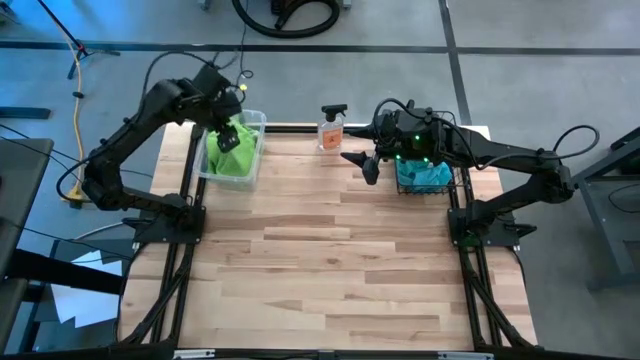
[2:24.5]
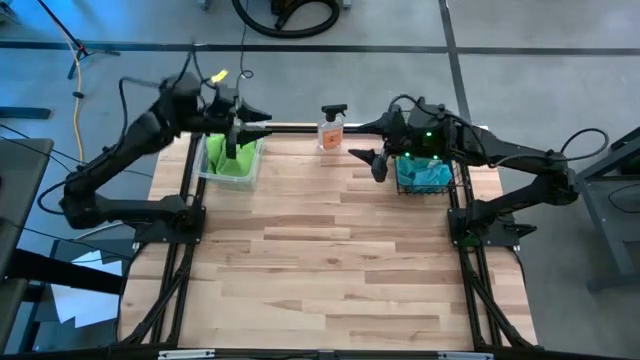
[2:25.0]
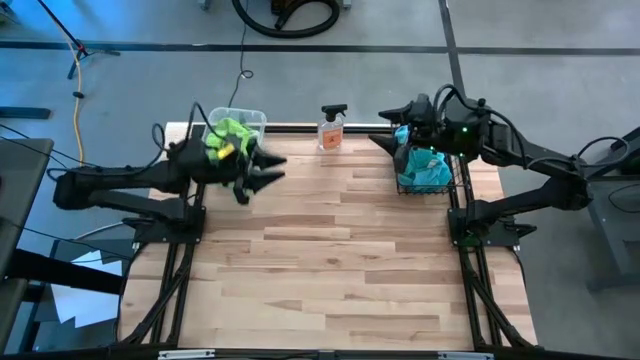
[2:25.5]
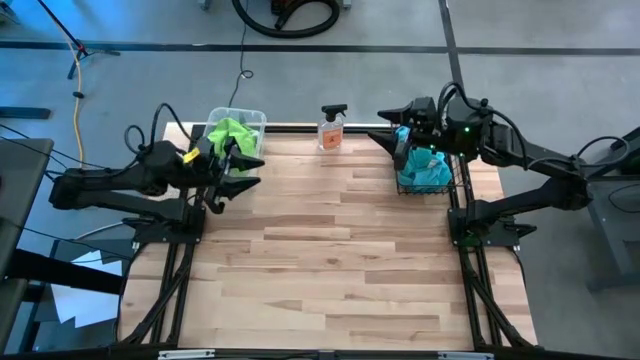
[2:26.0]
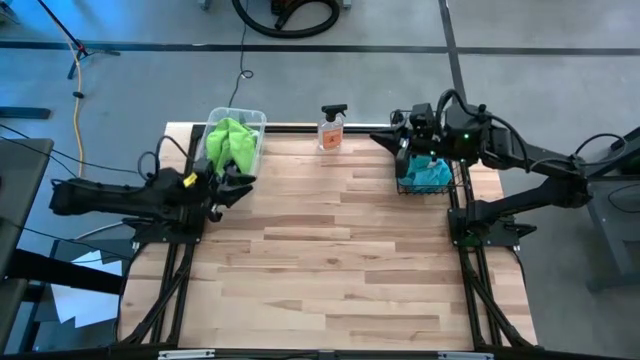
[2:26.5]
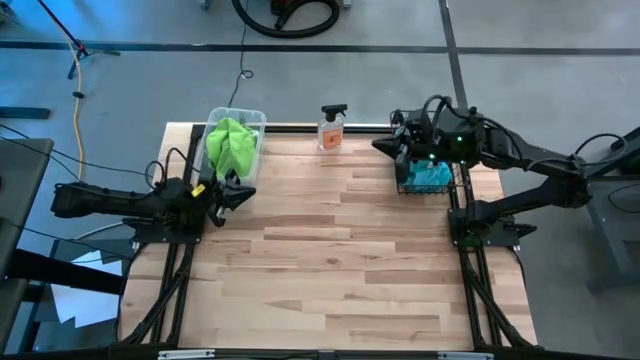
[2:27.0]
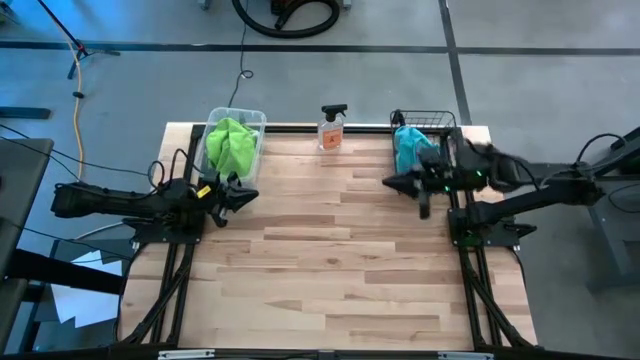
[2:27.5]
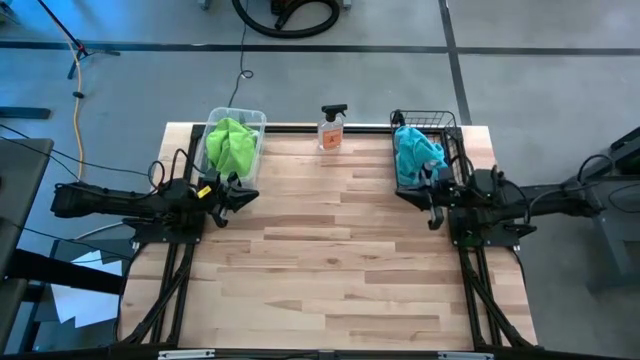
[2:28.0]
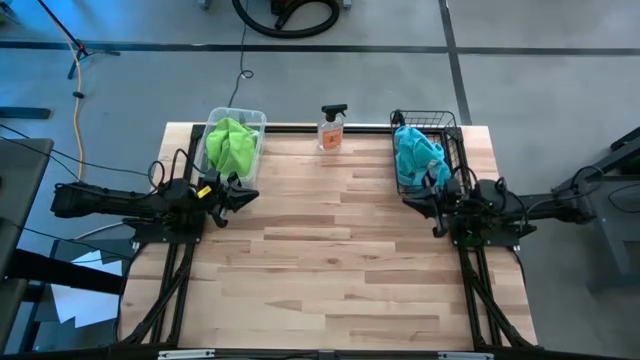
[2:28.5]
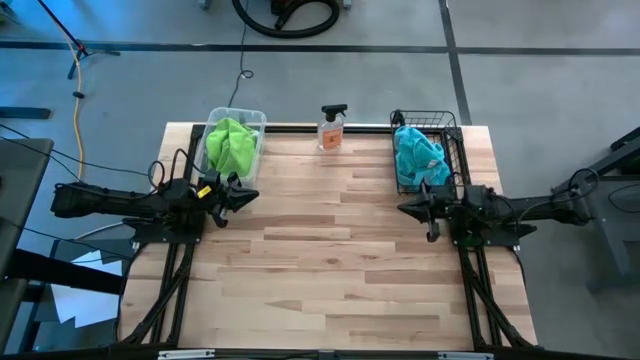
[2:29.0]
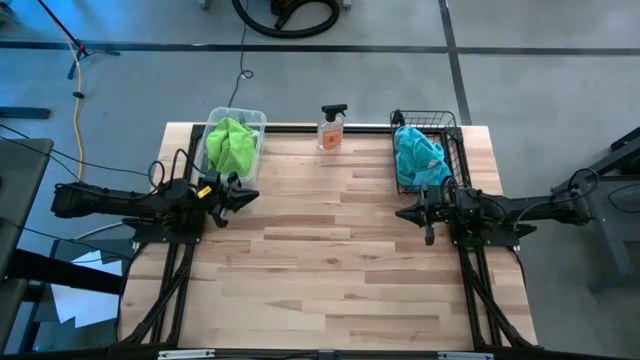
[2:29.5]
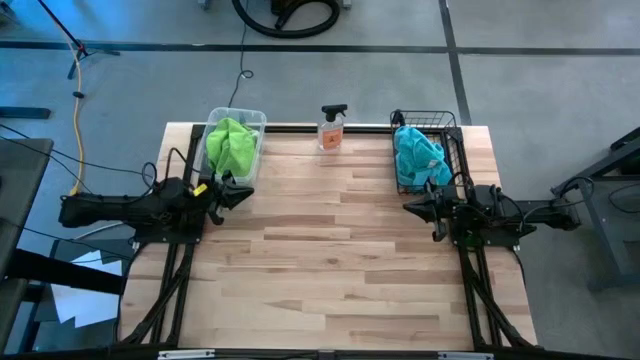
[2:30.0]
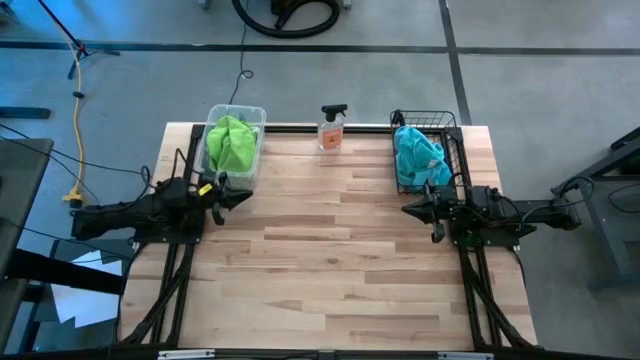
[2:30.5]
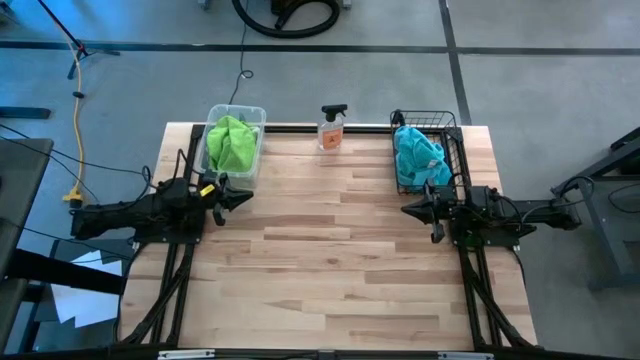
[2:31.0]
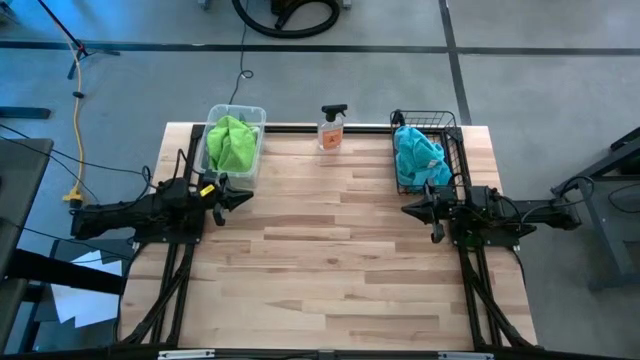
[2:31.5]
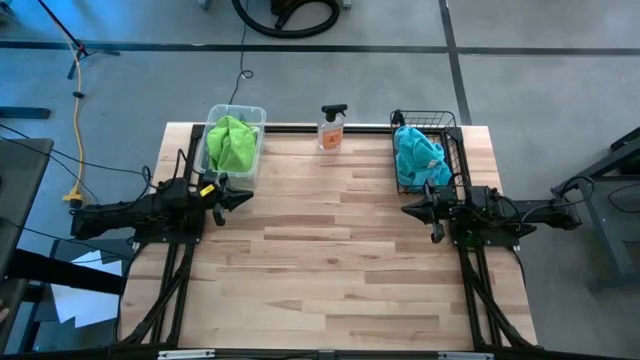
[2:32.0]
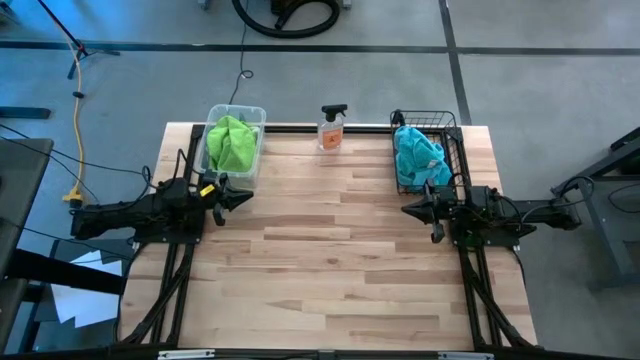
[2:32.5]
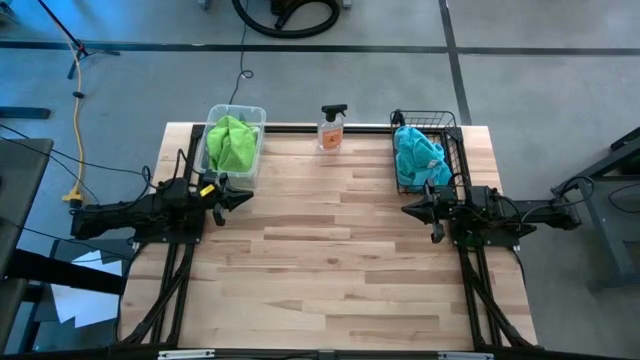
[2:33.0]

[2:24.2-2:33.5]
Task: Sort microfiber towel by color & place in baskets
Return to Home Position

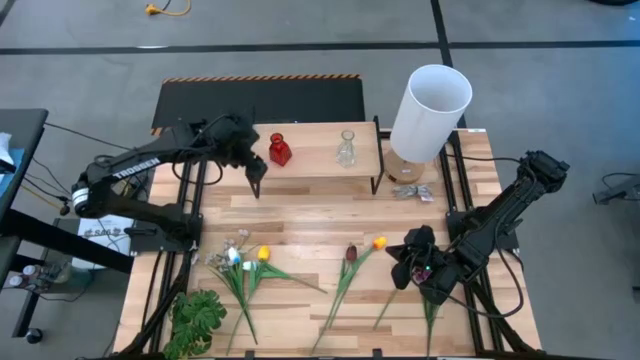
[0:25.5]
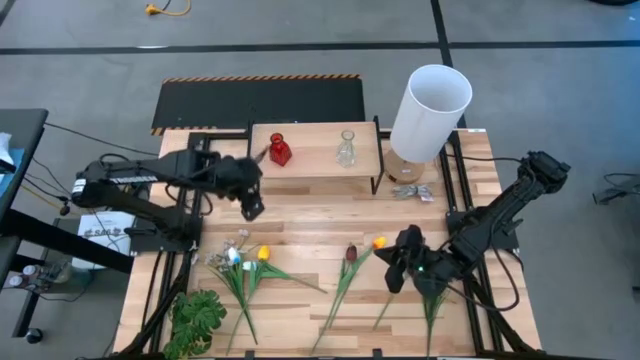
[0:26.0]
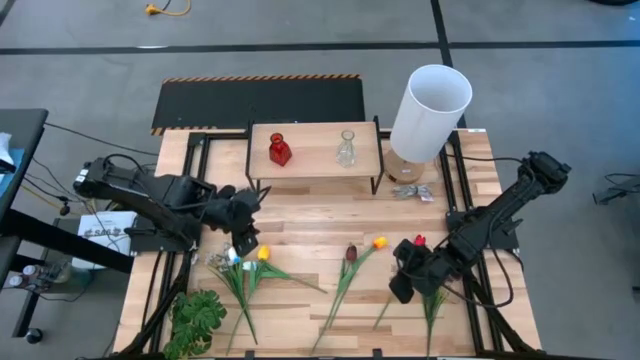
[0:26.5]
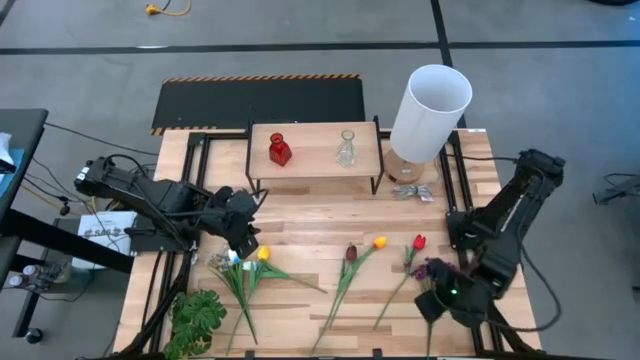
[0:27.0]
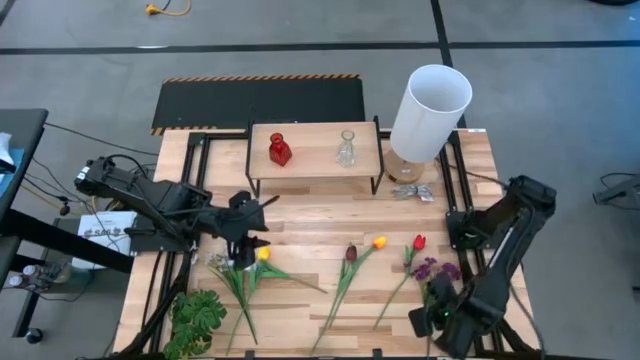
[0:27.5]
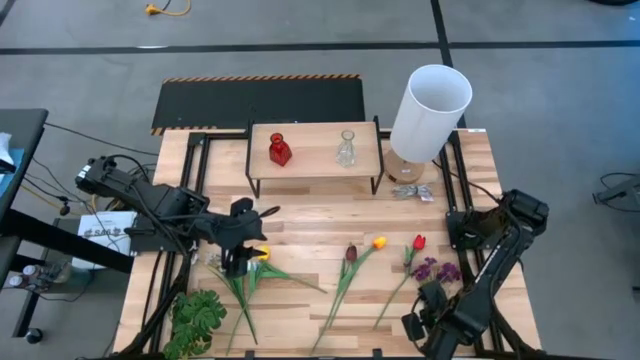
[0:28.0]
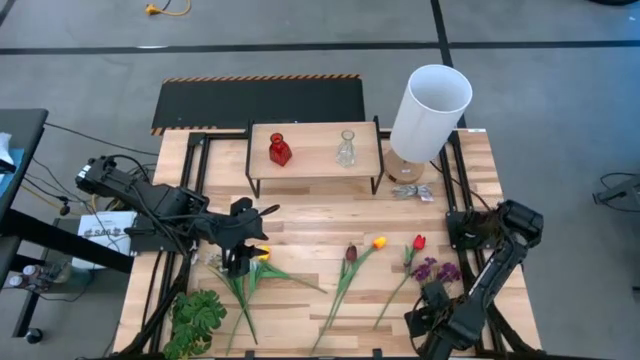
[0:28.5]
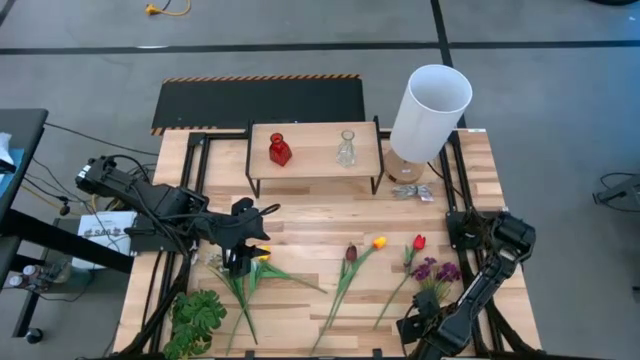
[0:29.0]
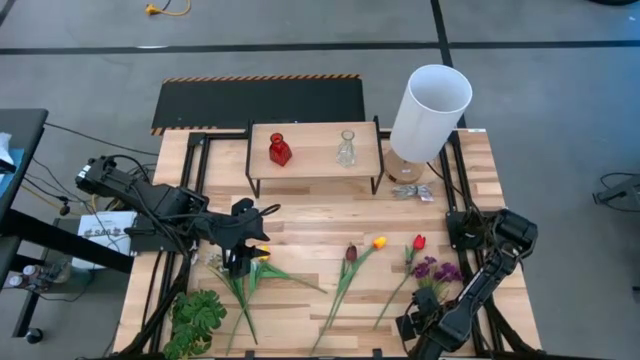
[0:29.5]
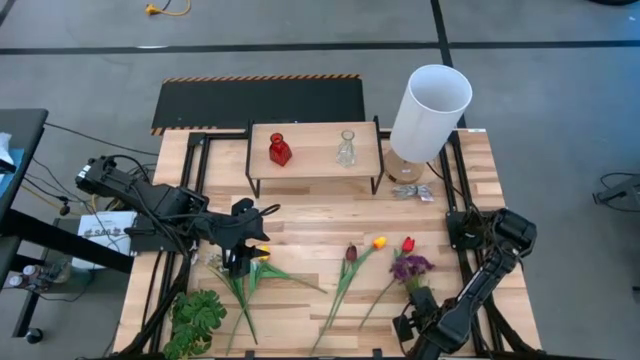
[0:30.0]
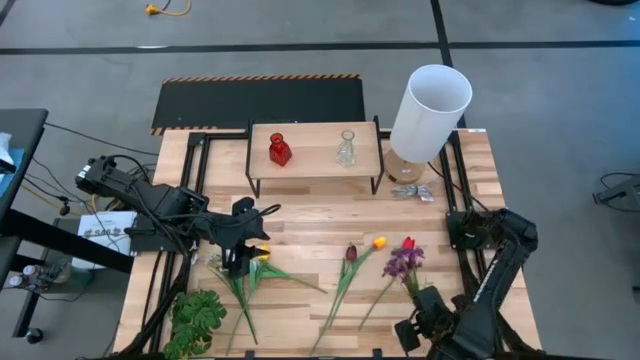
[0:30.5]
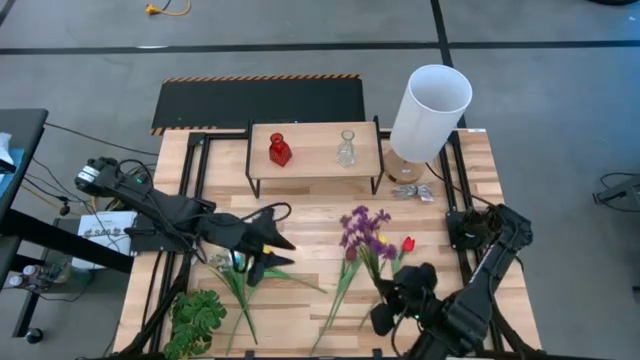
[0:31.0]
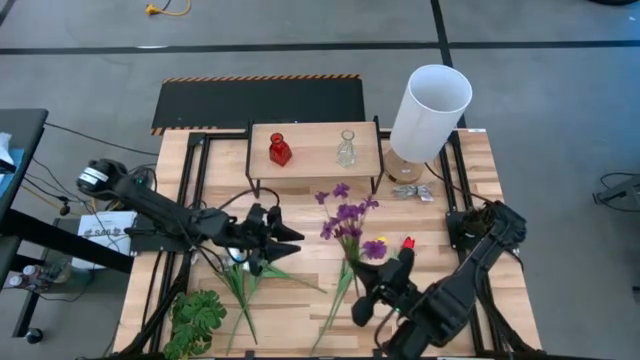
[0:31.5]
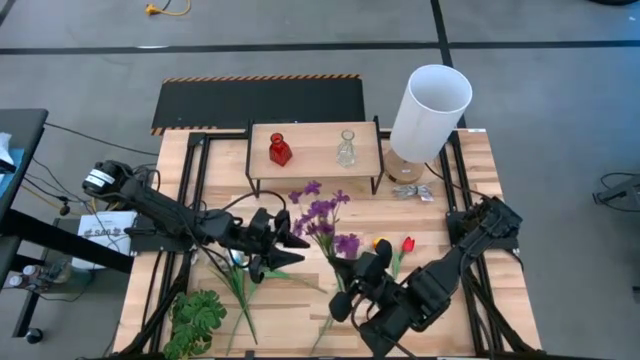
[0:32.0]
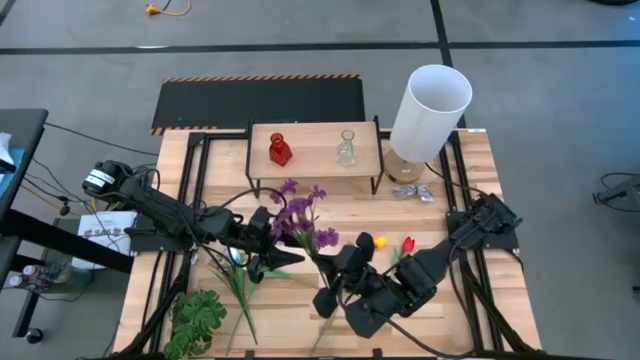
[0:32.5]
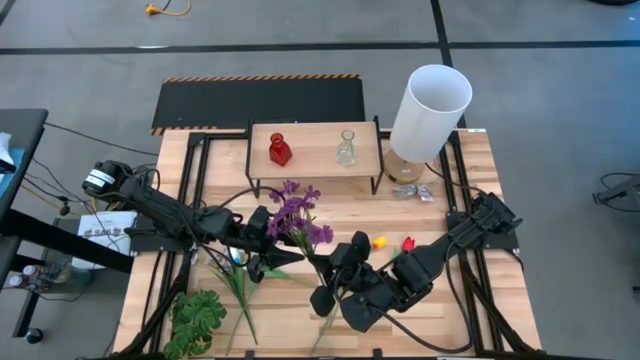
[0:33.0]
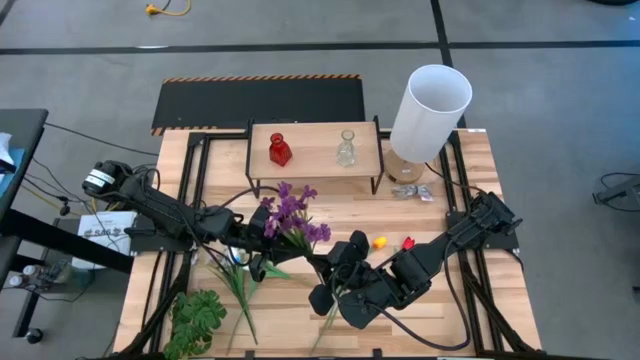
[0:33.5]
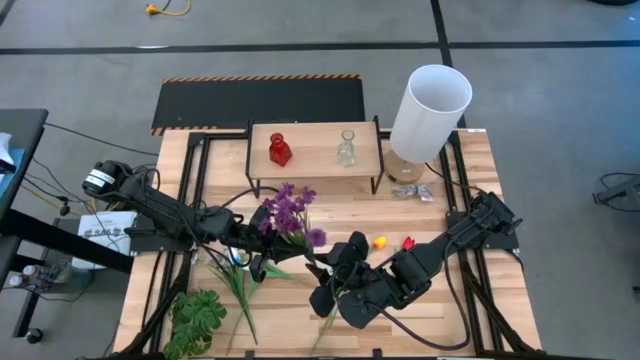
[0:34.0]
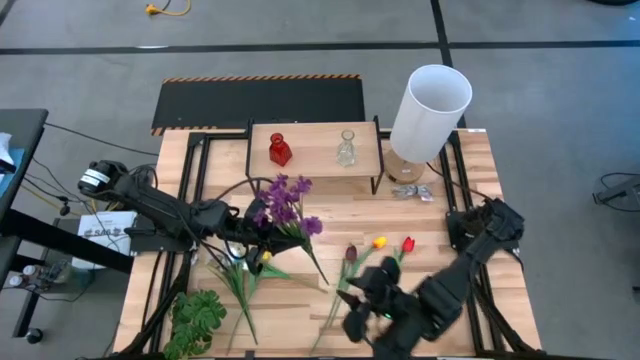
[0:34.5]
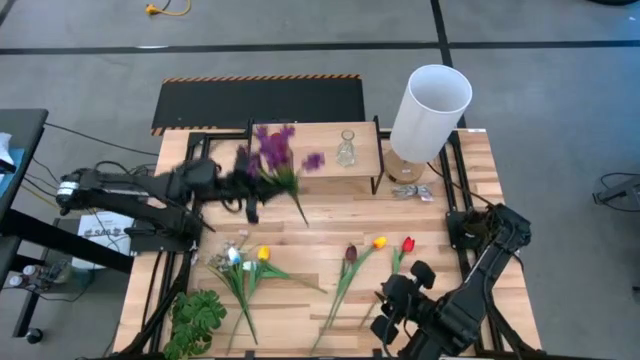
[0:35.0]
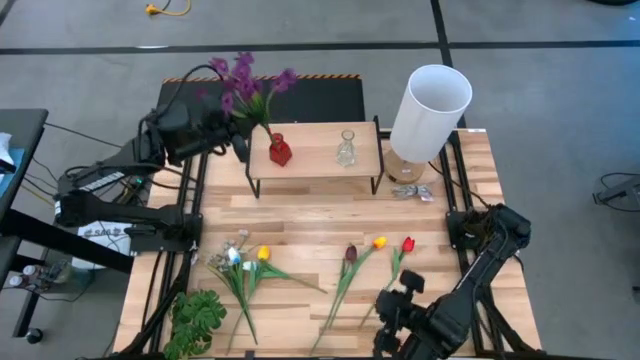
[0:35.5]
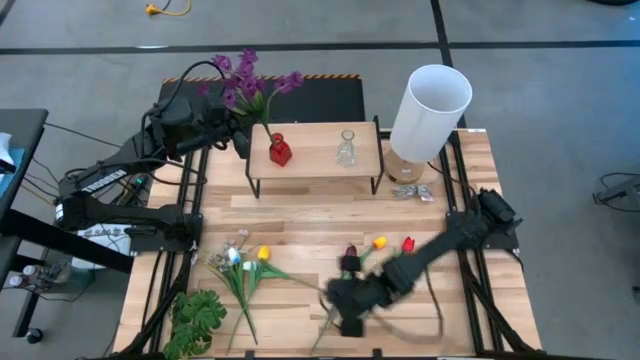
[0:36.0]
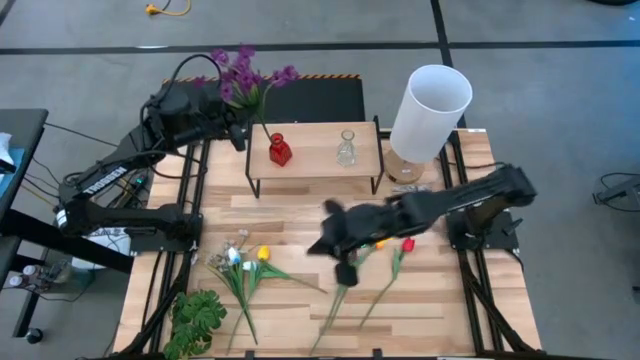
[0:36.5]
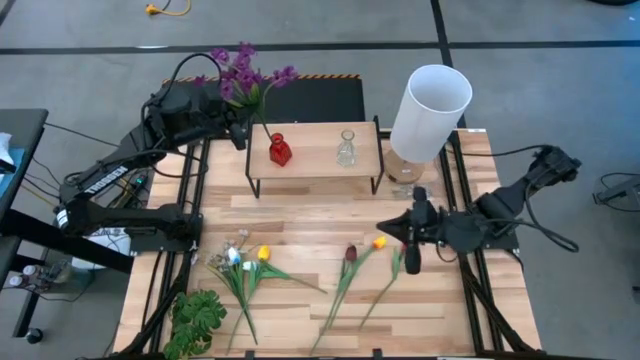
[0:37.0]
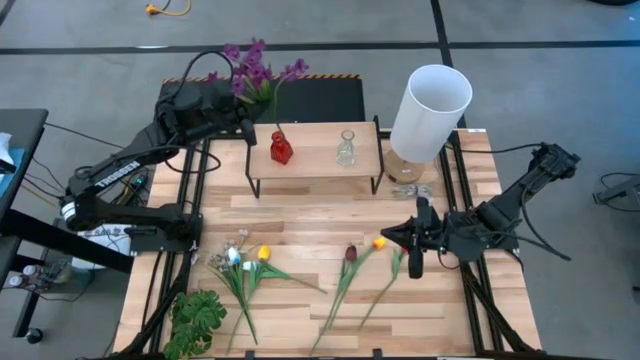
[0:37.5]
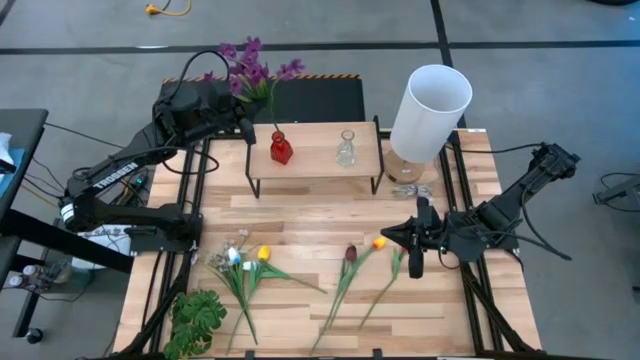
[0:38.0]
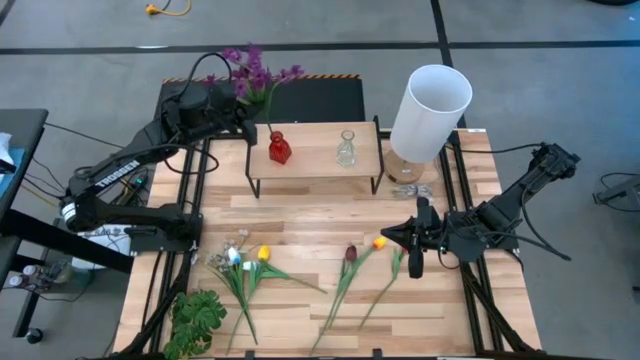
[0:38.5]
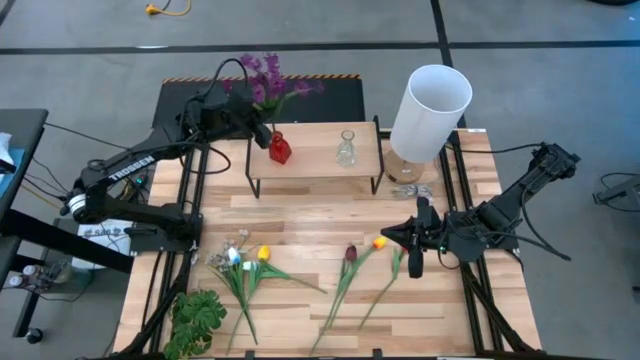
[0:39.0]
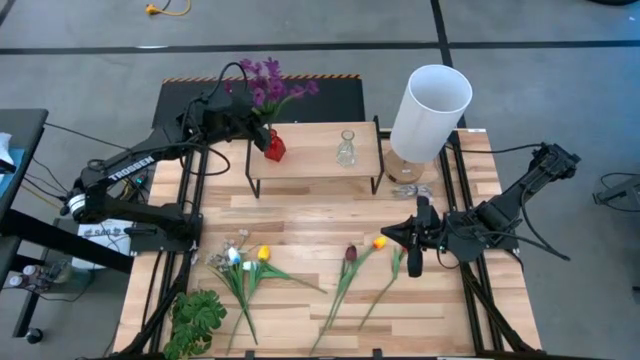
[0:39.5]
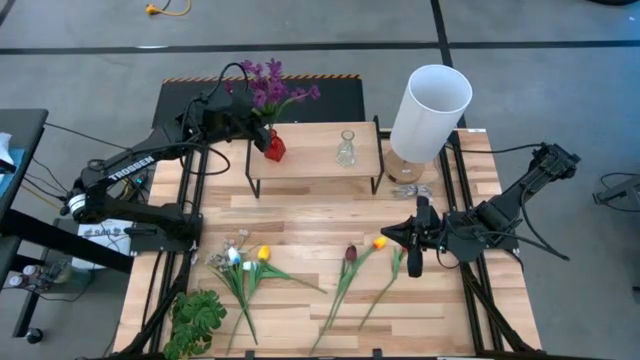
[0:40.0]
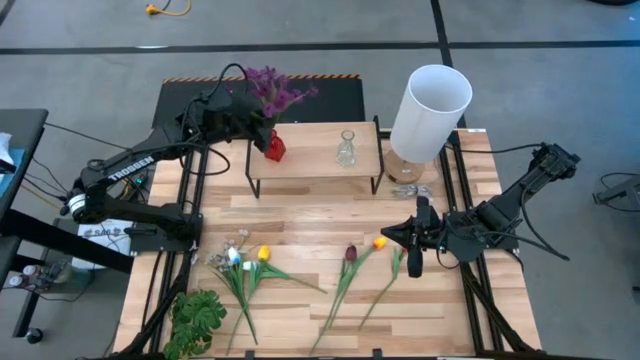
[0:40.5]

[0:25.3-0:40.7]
Task: Pick and place flowers into a vace then onto a shelf
Put the violet flowers into the red vase on the shelf
